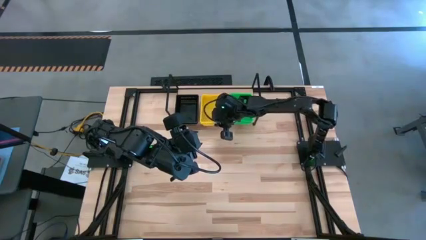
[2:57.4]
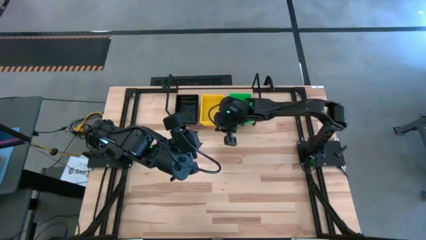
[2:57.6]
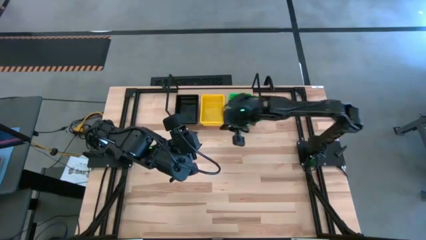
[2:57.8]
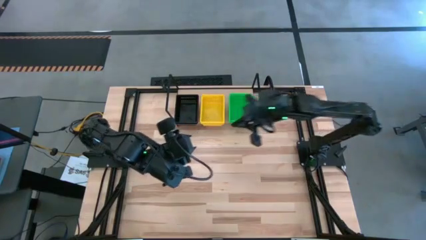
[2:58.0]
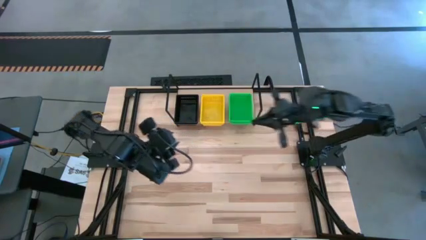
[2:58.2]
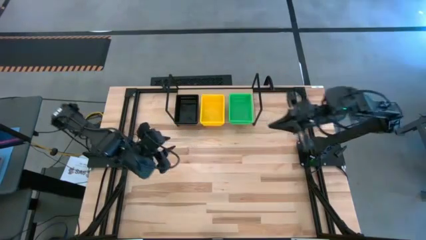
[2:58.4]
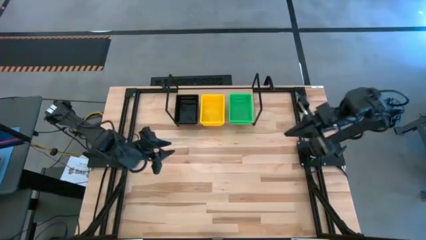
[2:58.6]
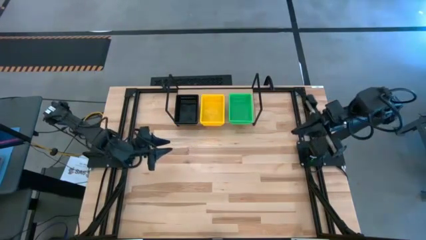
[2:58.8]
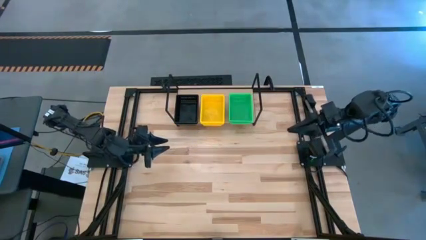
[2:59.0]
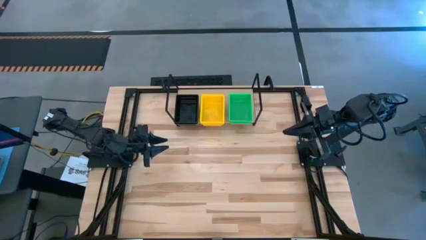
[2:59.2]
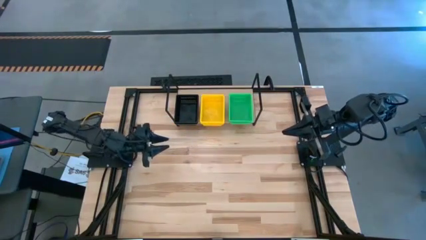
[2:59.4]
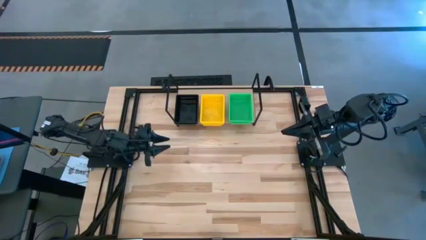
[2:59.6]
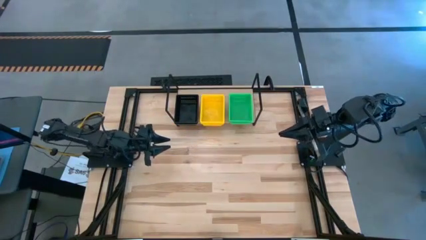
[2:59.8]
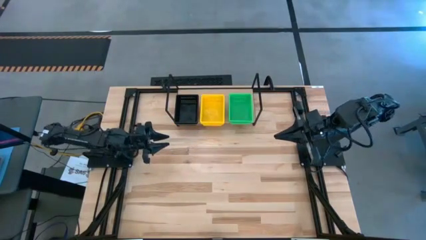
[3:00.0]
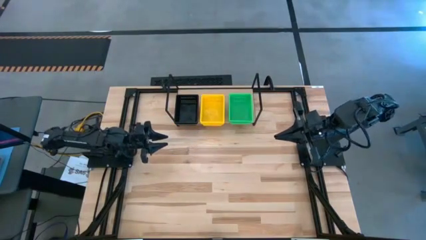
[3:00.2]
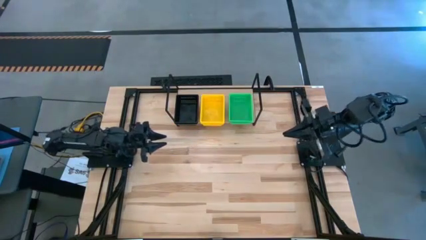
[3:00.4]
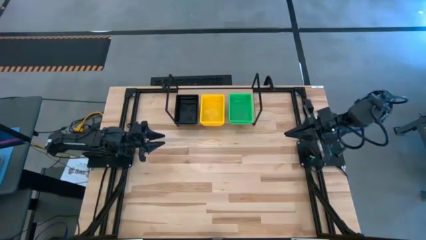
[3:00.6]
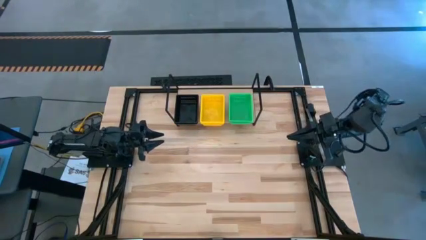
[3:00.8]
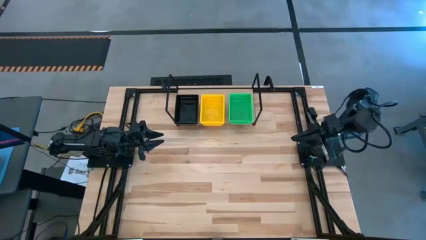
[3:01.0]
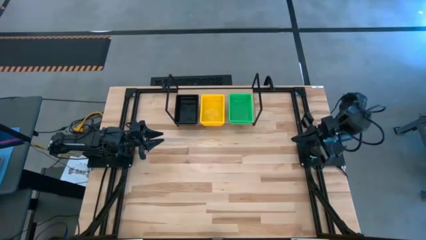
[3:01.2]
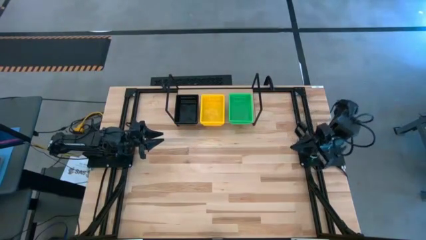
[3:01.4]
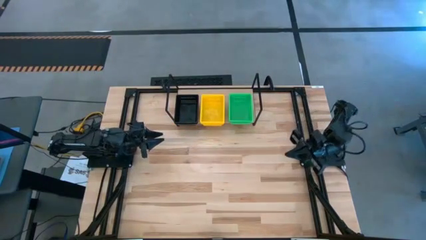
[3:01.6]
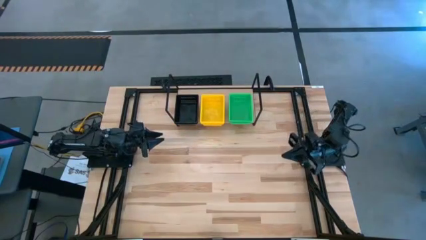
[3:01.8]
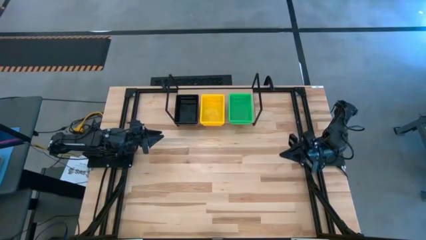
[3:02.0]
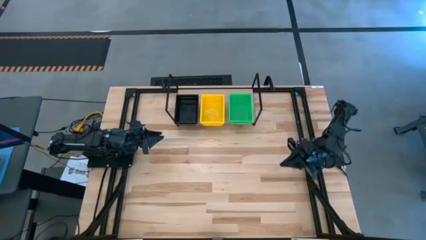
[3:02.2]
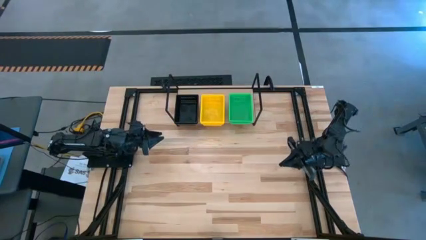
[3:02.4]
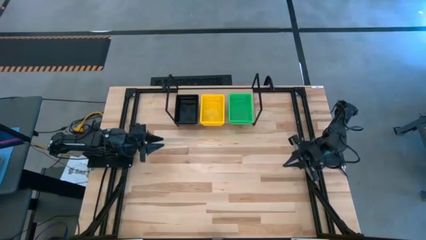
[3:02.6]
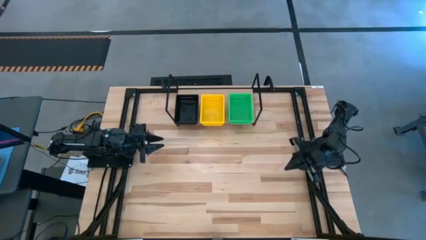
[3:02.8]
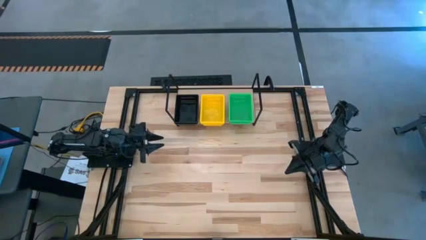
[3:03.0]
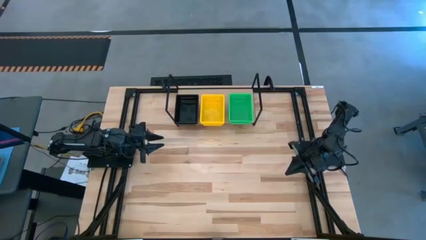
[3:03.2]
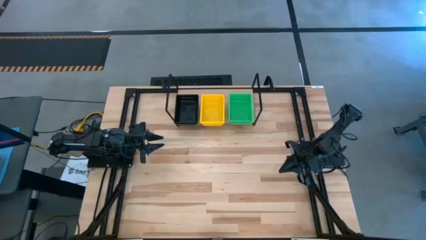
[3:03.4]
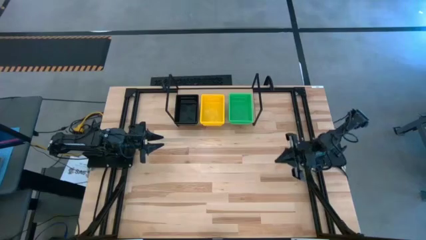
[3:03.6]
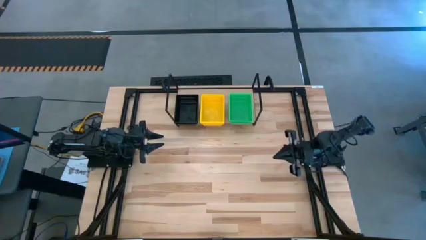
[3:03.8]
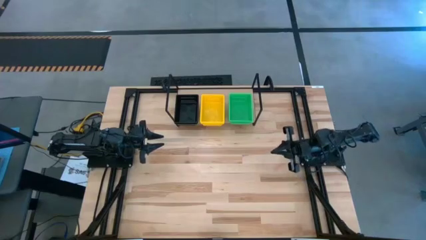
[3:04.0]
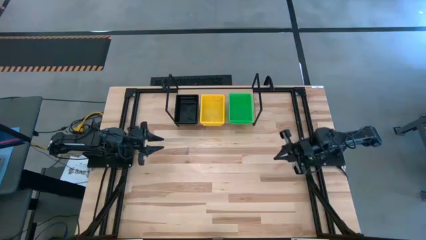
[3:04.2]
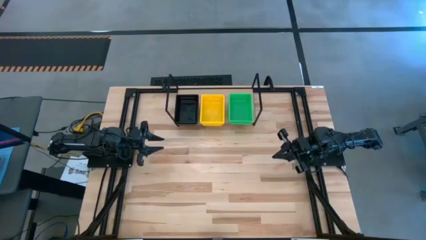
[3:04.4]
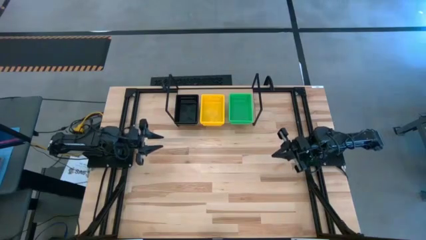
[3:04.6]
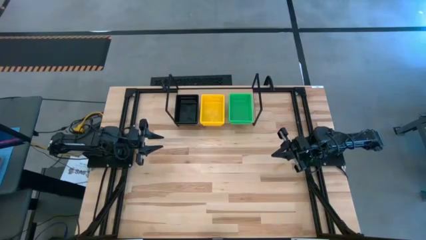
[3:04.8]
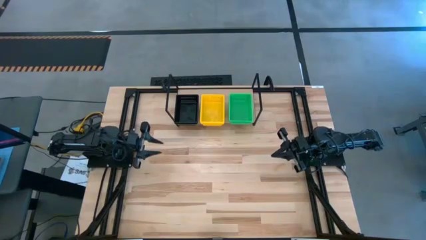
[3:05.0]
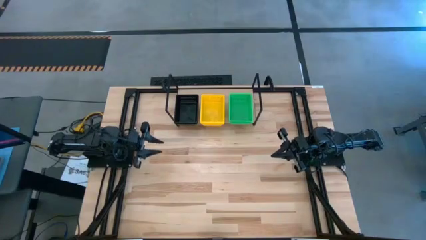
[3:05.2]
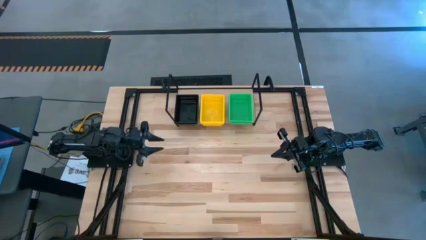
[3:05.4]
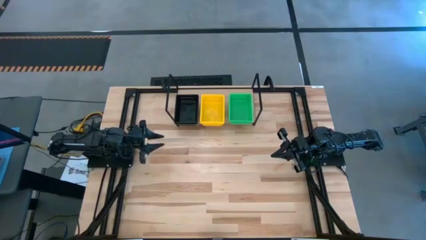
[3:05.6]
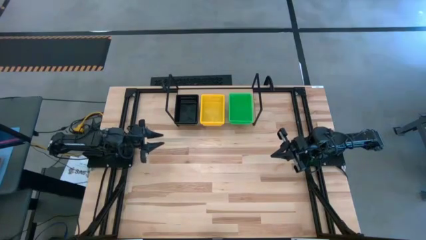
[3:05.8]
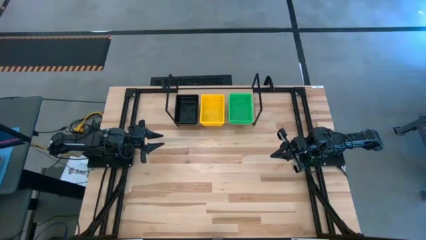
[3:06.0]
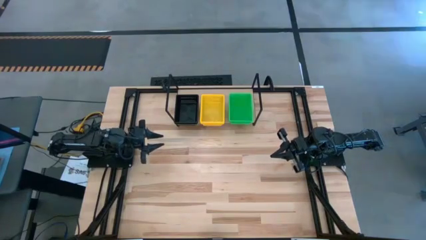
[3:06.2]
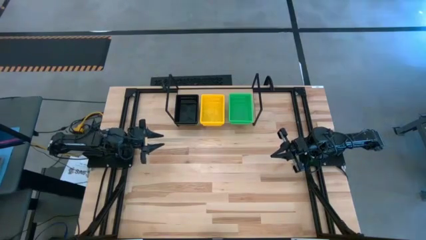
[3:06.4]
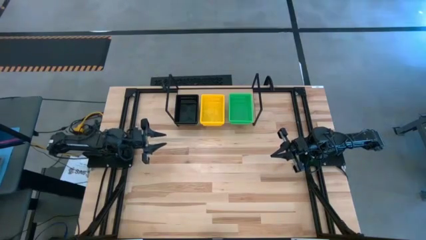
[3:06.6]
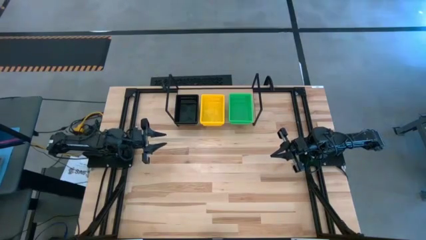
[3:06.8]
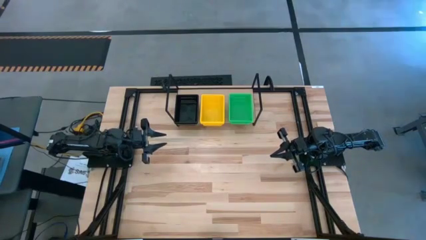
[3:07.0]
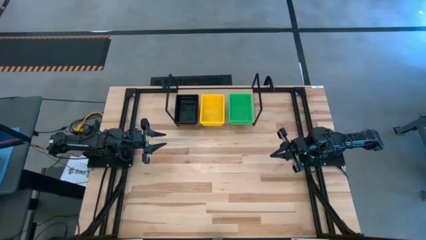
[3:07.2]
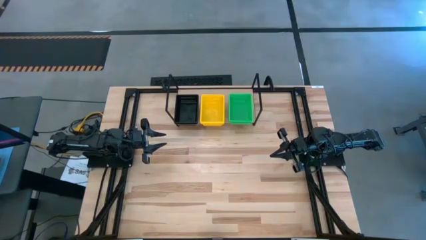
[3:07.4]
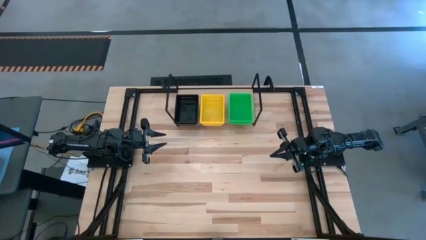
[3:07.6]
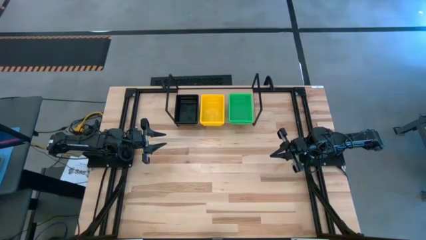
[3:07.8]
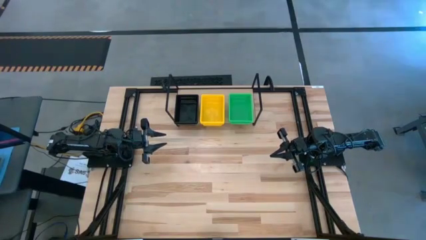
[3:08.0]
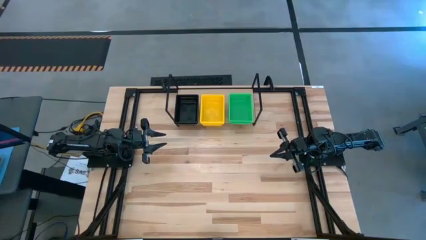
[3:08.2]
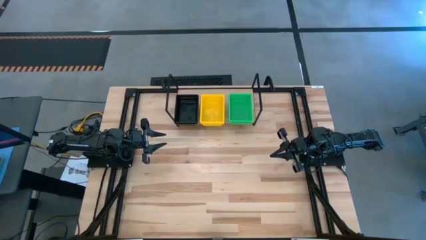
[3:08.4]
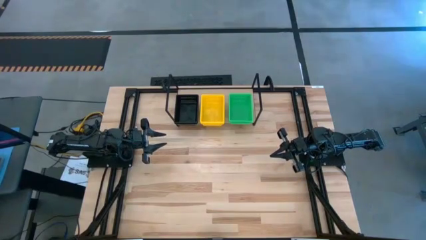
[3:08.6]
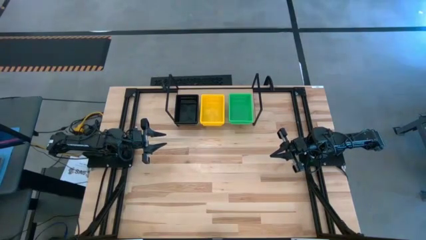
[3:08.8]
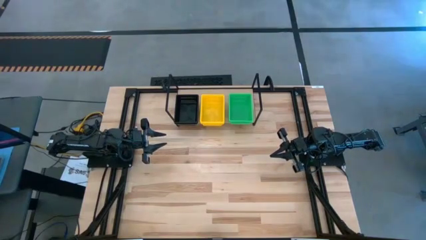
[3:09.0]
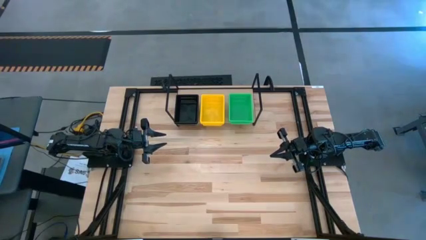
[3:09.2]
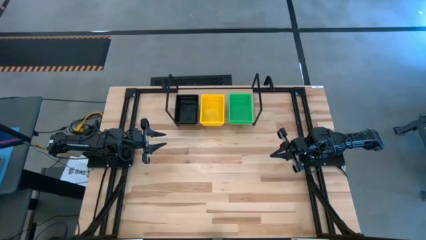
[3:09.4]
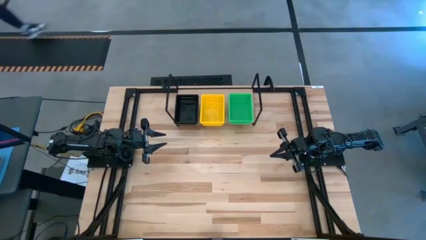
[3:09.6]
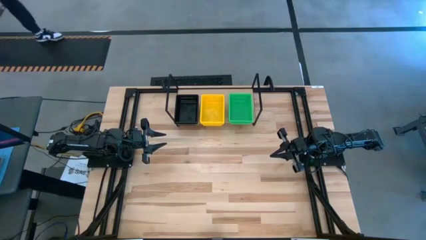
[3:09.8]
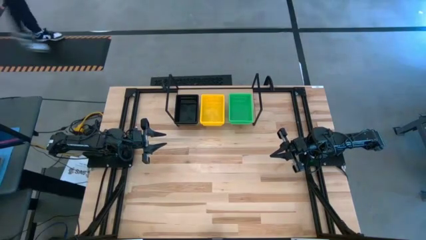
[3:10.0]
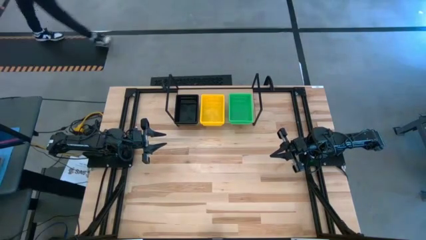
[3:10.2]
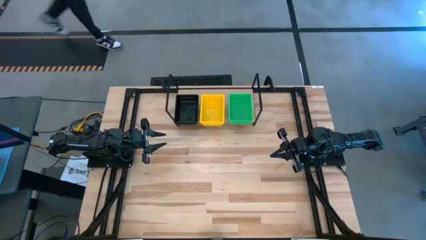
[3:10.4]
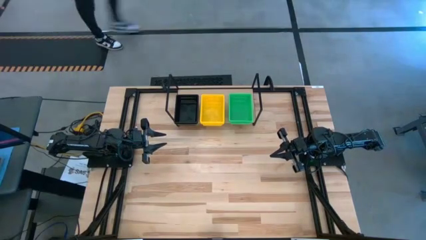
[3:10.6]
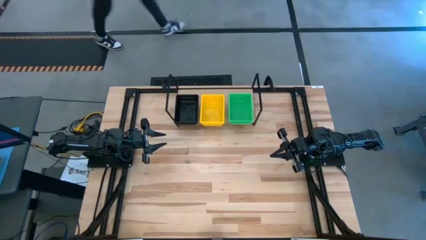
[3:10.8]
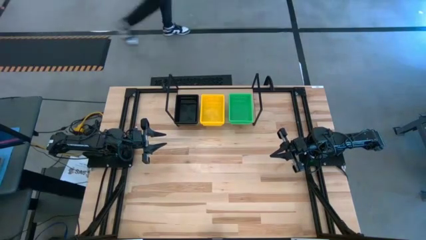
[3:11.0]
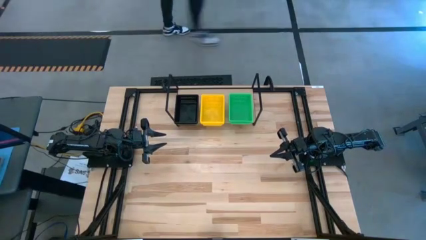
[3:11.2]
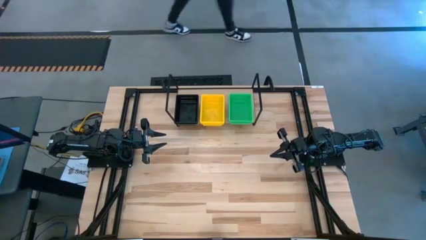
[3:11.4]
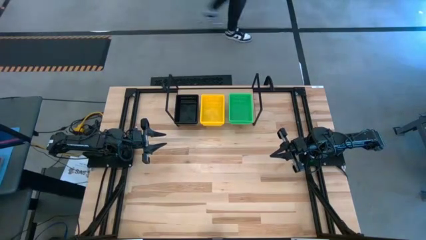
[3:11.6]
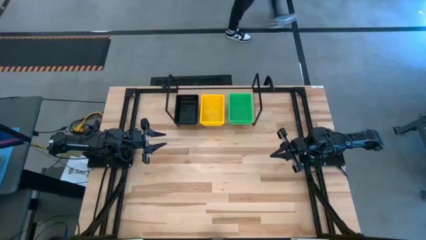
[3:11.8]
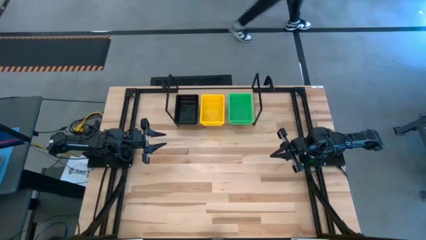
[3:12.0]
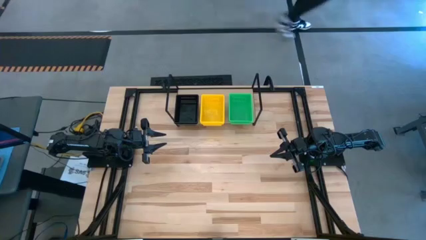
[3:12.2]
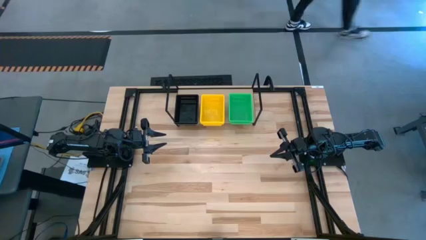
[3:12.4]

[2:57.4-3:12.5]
Task: Stack baskets on shelf by color
Return to Home Position
